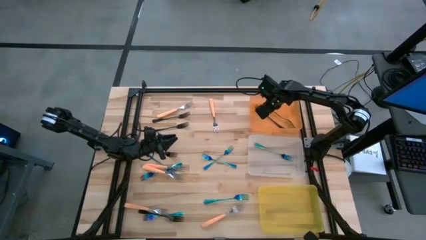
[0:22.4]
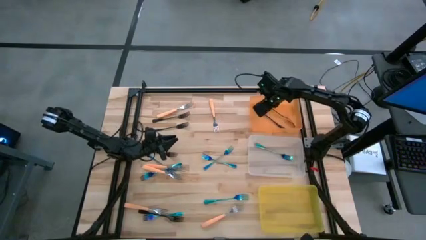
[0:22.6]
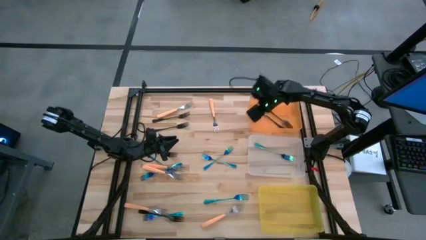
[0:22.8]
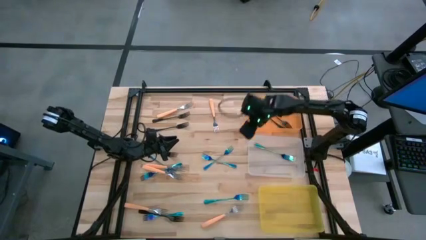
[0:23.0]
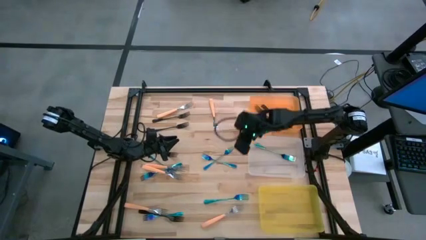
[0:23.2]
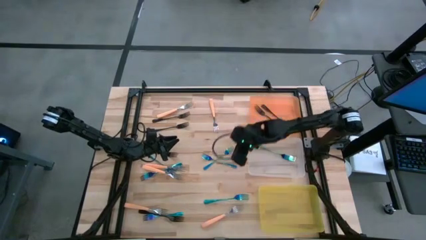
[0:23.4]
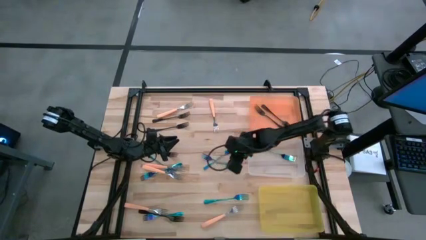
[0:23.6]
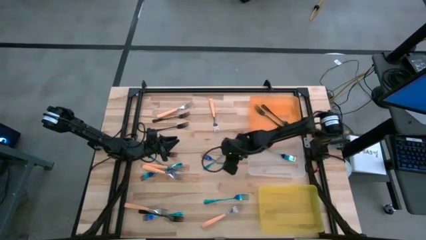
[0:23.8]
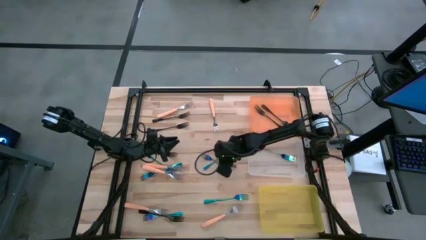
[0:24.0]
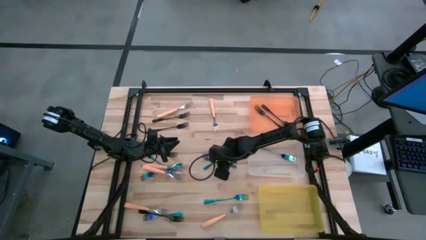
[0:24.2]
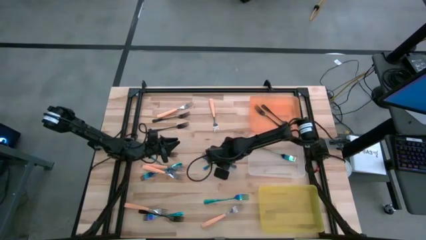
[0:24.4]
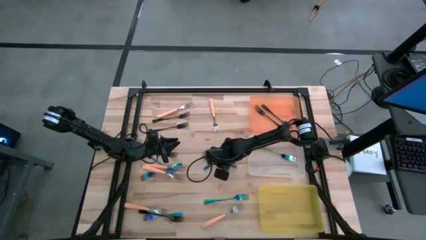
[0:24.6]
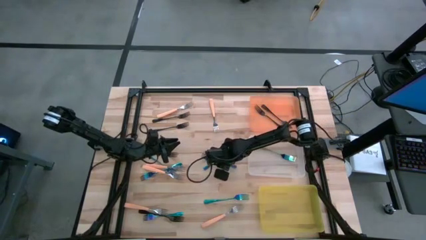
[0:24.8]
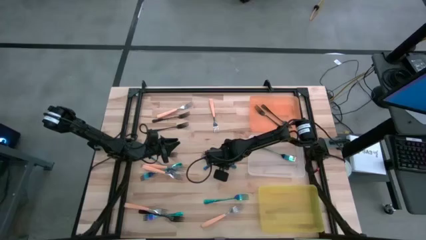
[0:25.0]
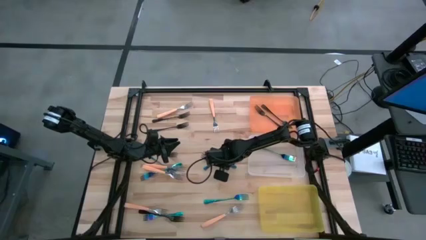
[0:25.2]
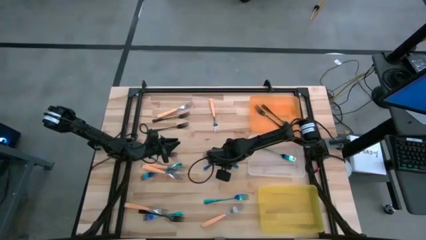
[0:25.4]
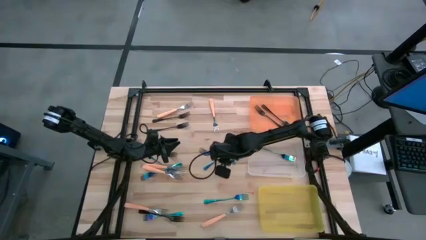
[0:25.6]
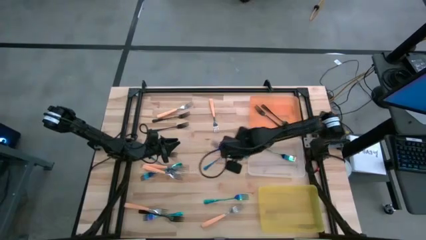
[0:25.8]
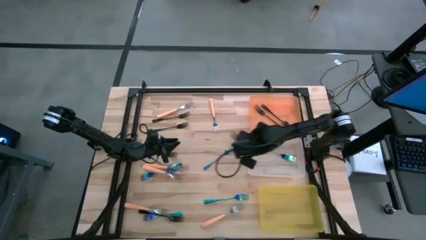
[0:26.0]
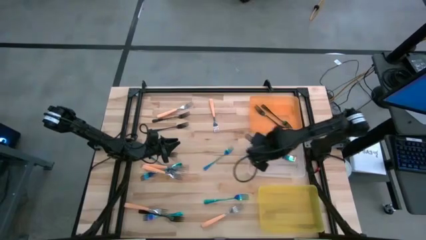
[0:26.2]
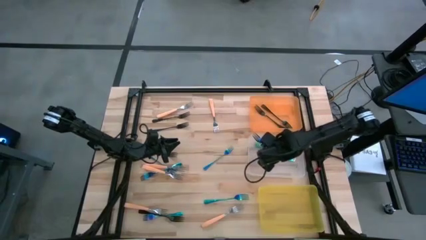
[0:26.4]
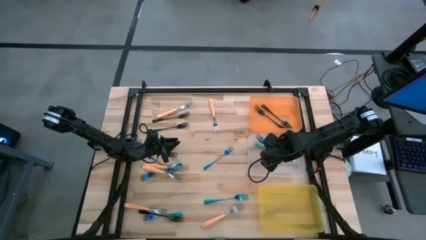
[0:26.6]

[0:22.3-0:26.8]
Task: Sort silverware by color (type)
Put the blue fork into the transparent bin

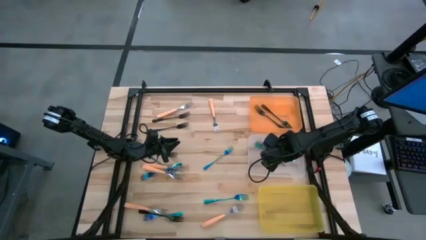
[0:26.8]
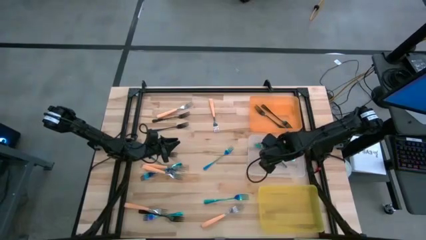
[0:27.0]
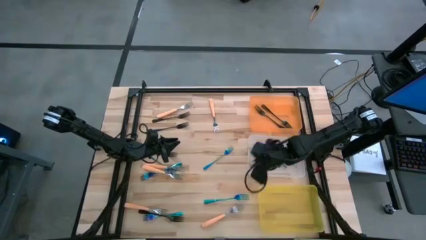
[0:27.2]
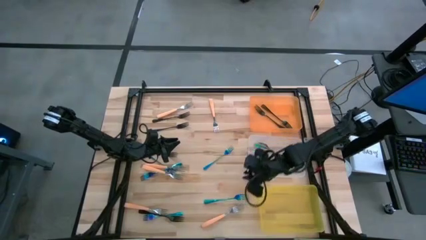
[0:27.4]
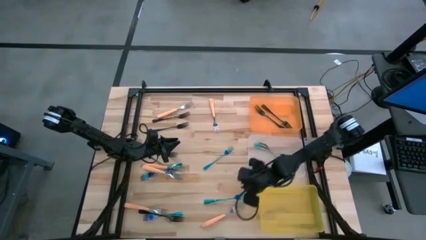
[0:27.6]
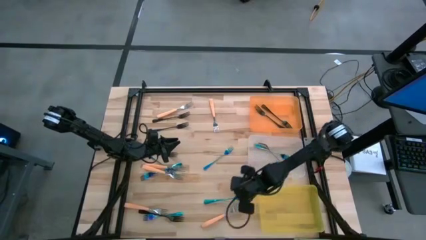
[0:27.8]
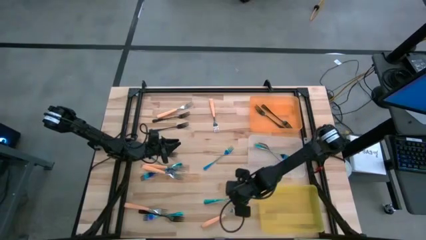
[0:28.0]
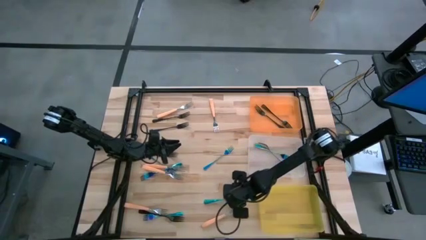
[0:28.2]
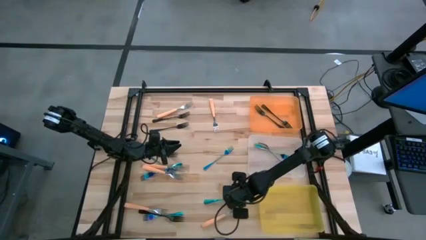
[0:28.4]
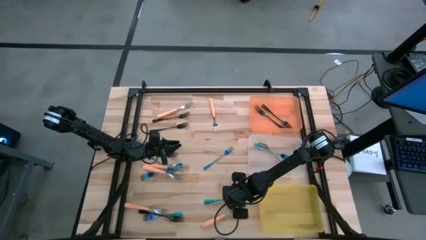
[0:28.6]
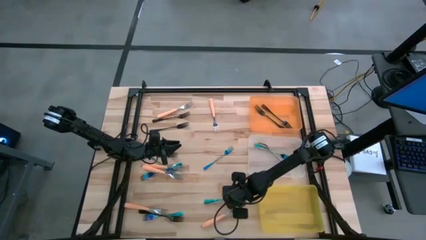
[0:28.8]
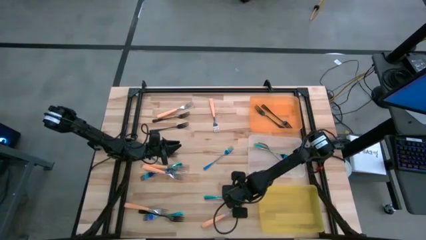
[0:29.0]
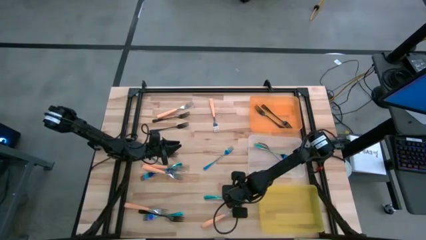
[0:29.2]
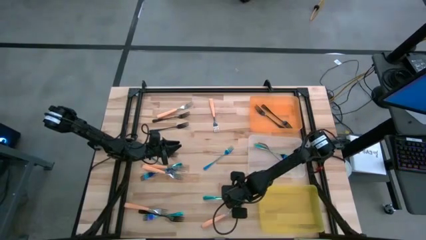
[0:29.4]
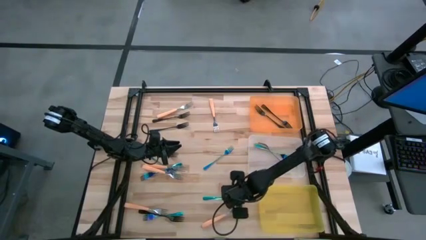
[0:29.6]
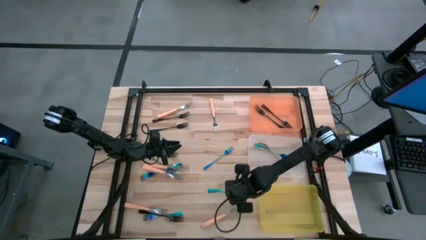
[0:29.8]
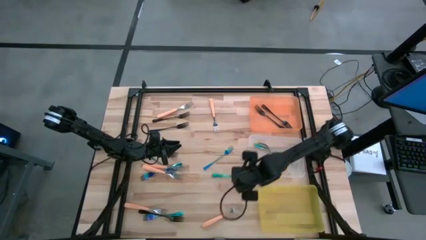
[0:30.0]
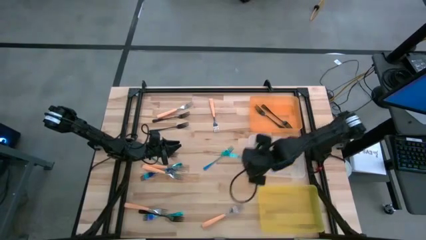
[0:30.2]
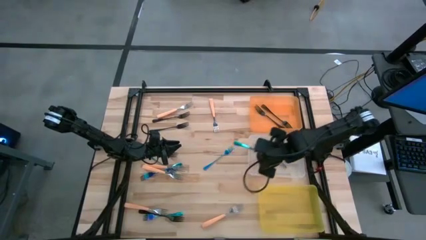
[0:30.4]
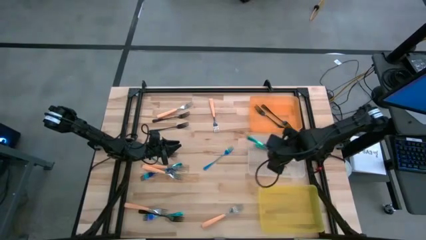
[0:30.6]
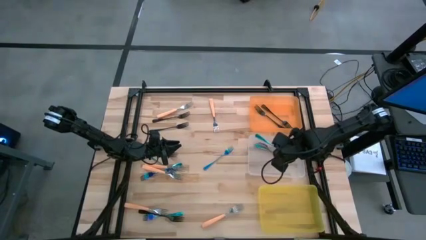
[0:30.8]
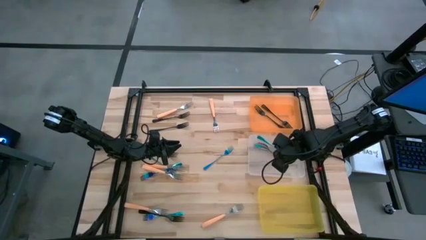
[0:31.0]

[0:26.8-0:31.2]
Put the blue fork into the transparent bin

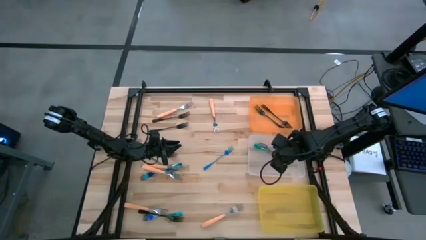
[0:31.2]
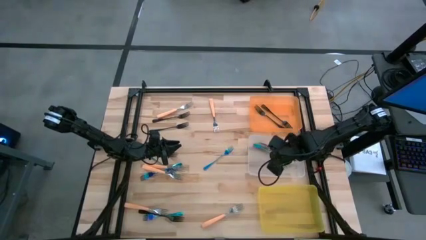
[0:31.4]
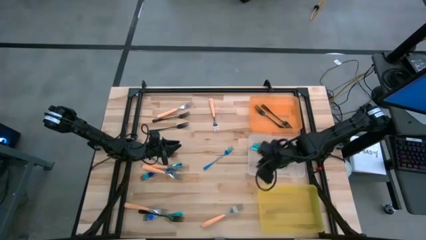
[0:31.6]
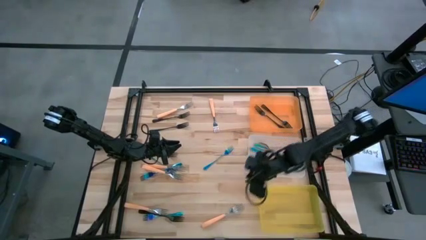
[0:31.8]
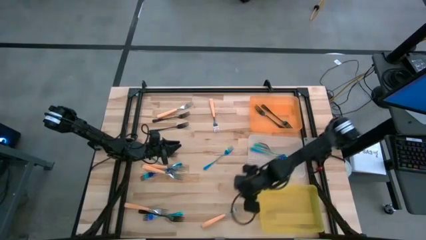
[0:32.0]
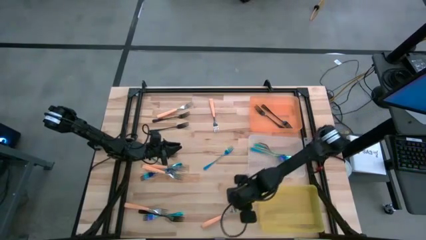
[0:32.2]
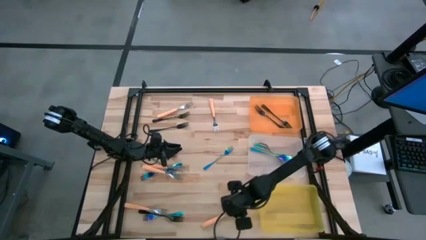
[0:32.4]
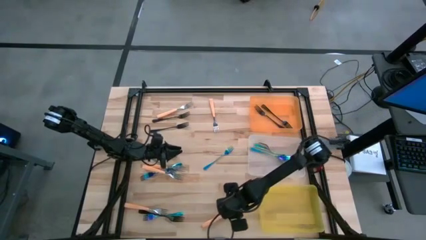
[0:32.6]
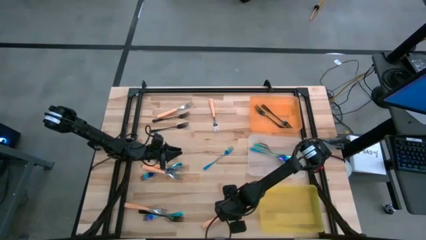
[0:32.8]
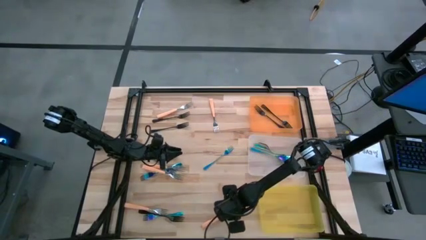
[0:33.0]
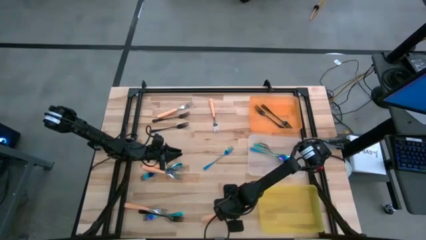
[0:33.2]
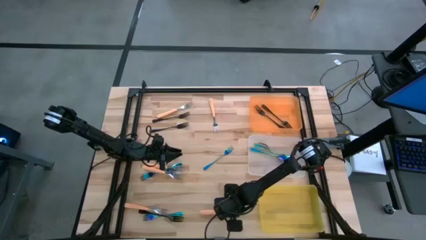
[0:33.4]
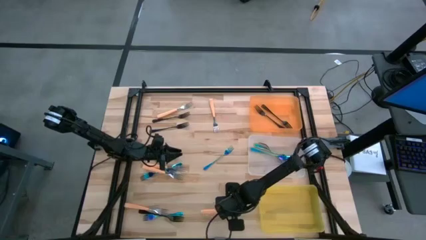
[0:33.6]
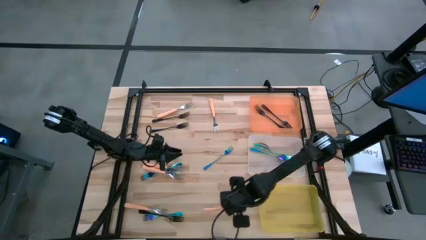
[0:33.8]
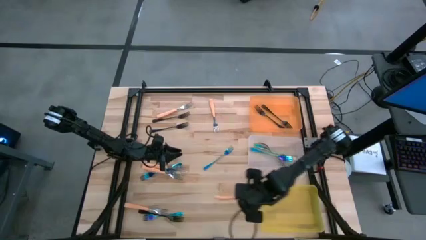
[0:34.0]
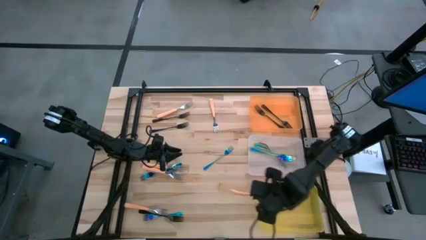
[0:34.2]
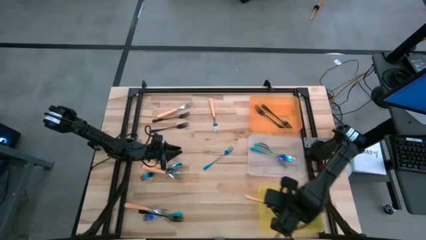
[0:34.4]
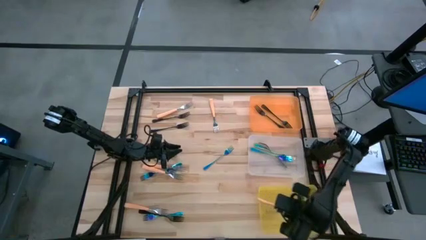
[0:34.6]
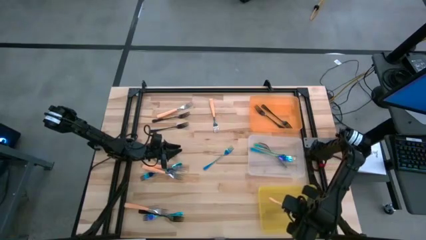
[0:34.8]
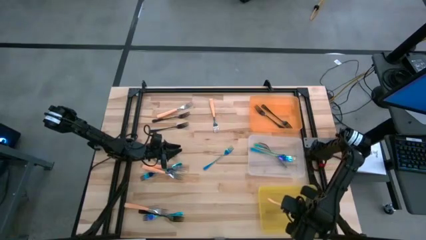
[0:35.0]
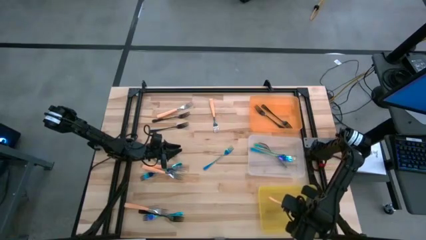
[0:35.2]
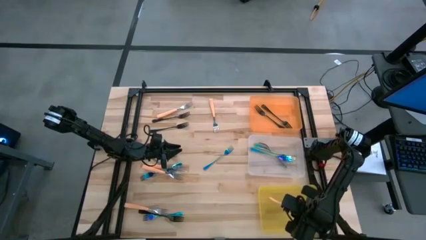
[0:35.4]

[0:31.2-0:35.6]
Put the orange fork into the yellow bin

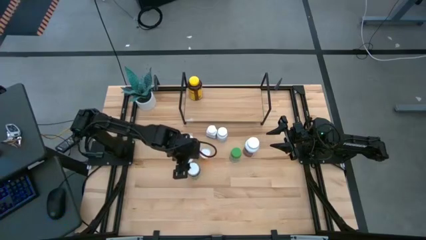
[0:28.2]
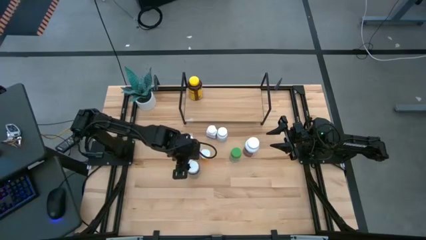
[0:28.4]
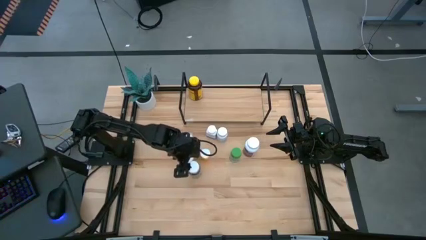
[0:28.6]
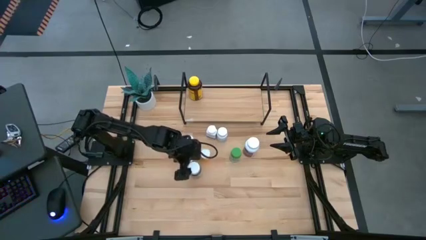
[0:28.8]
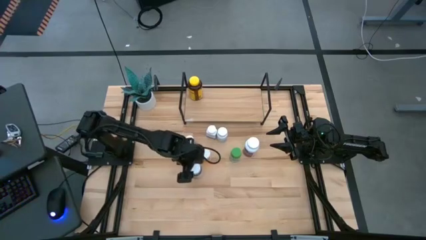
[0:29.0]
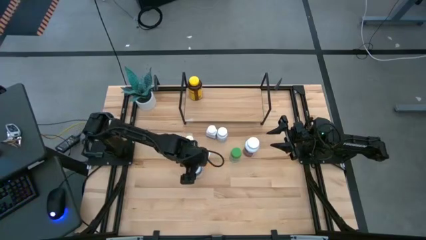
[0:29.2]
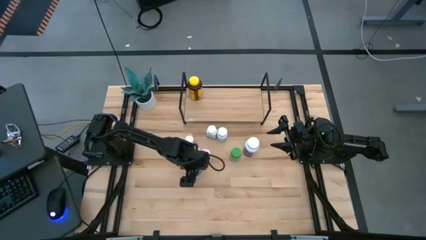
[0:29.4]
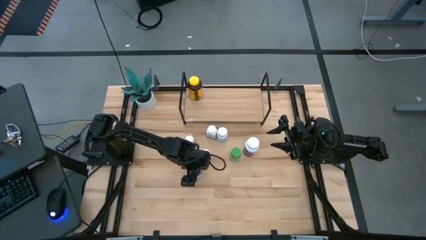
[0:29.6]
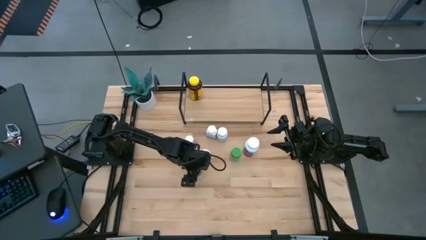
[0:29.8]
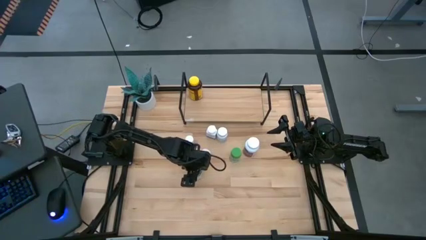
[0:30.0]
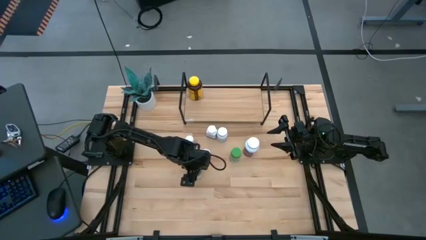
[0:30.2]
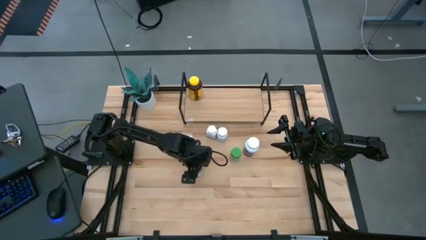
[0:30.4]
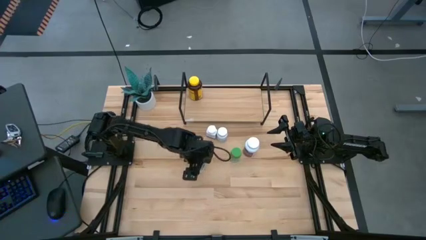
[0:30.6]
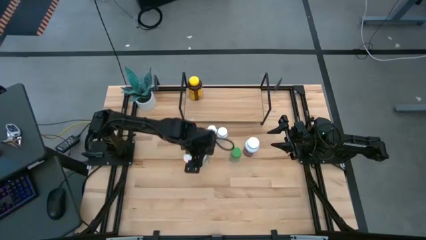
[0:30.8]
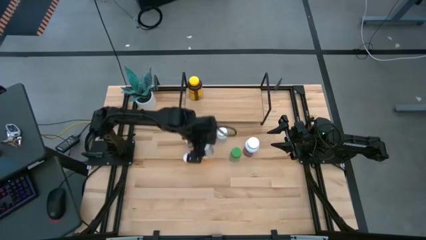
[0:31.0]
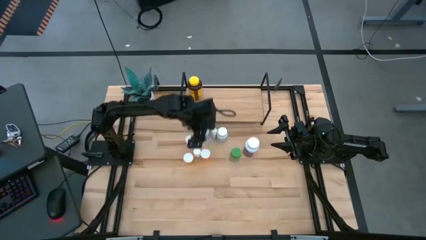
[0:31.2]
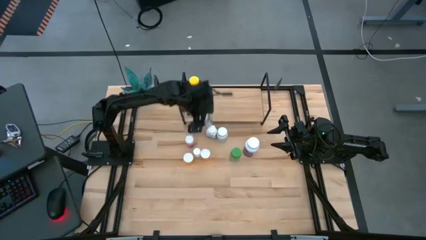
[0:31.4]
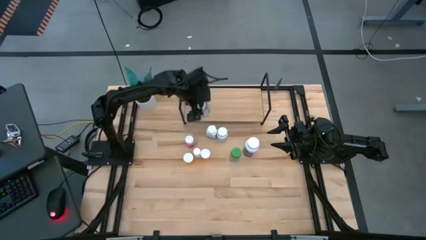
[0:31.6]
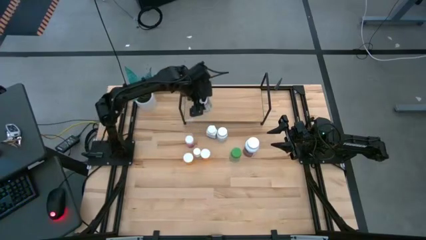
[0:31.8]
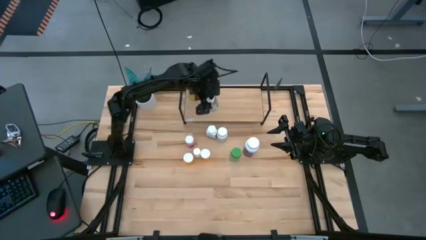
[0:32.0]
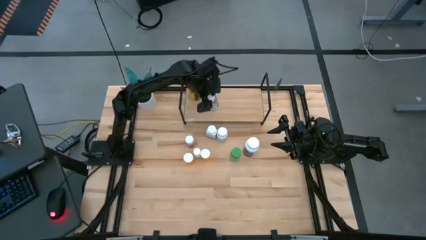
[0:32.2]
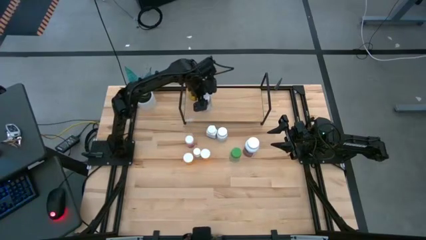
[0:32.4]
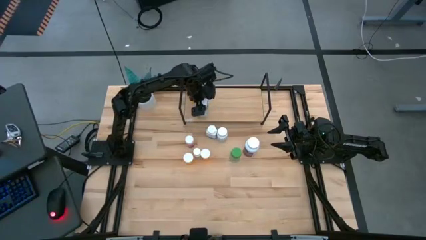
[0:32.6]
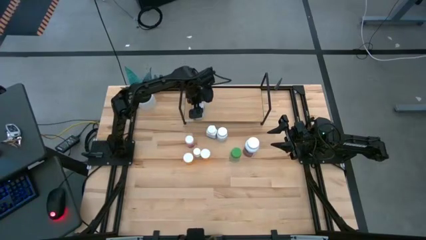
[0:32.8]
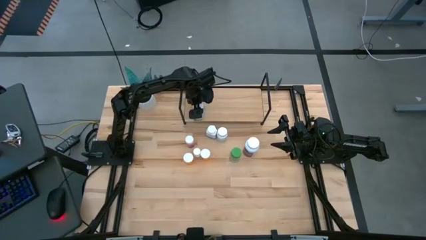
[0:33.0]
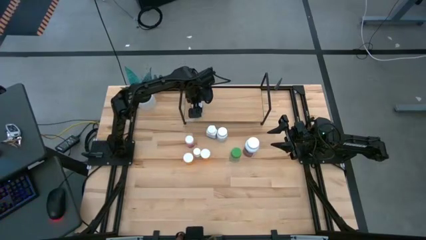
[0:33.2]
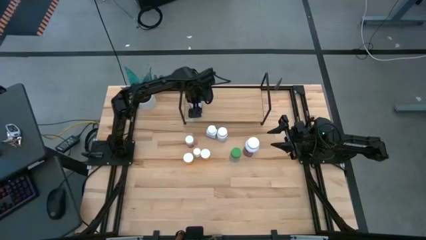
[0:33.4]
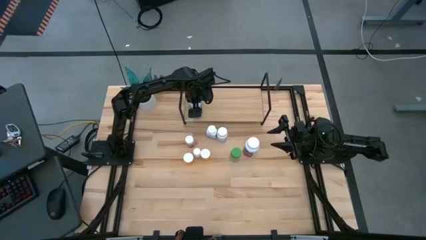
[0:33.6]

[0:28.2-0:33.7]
Task: Pick and place medicine bottles onto shelf by color
Put the transparent medicine bottle on the shelf
